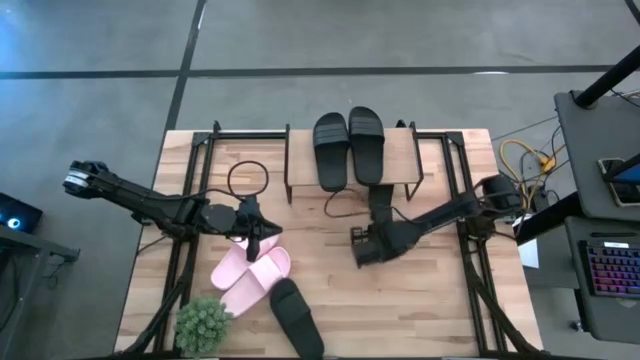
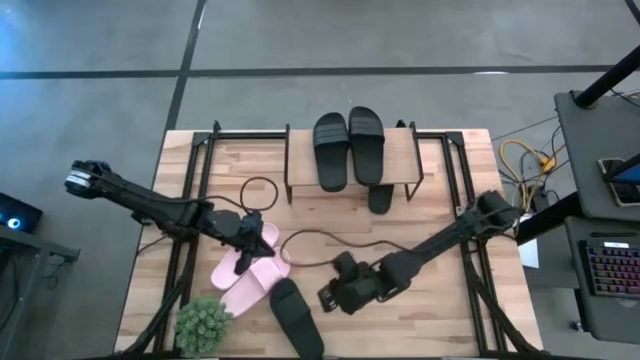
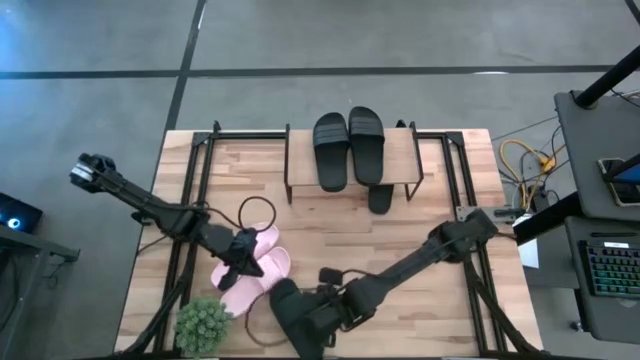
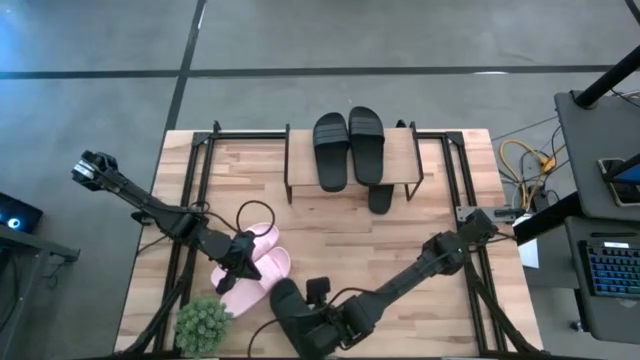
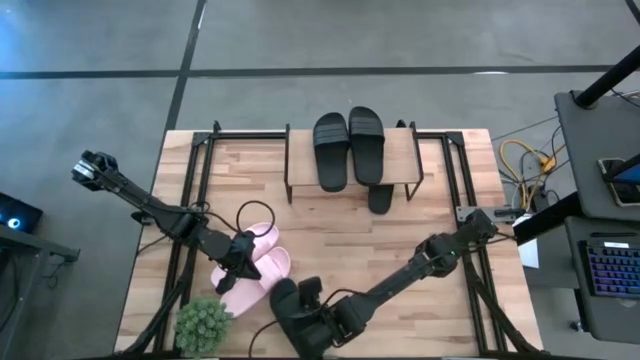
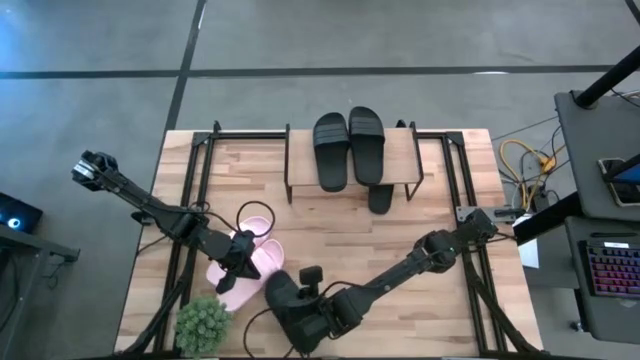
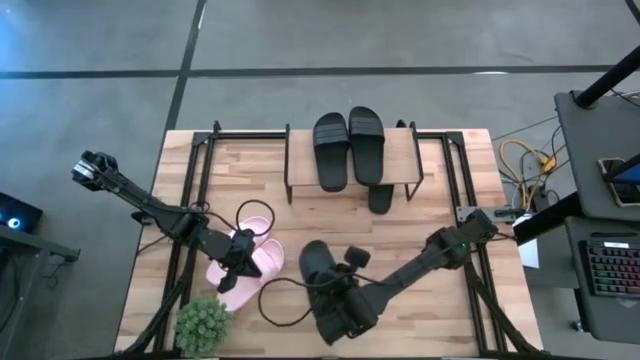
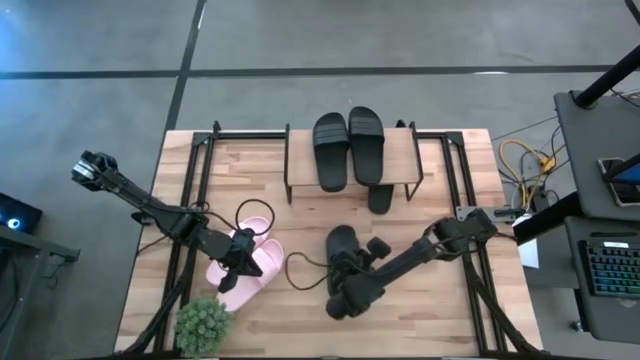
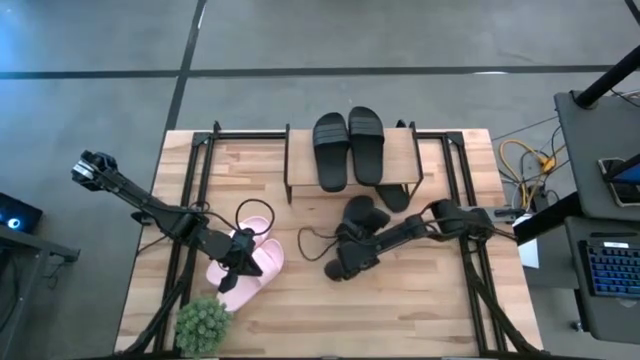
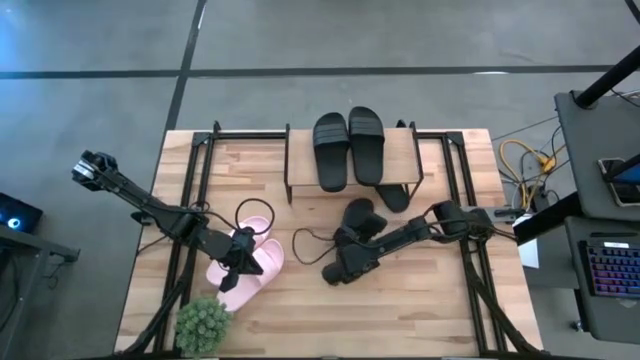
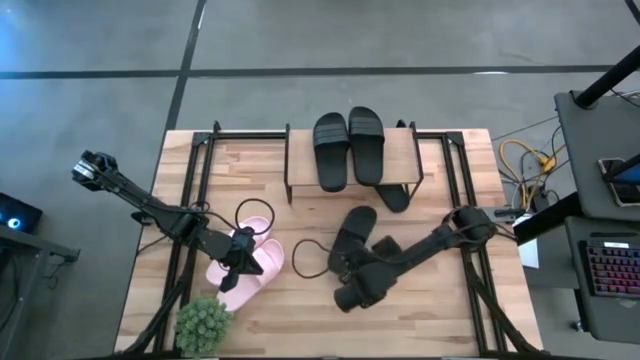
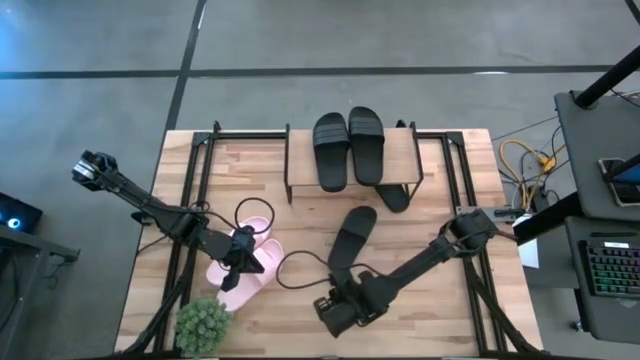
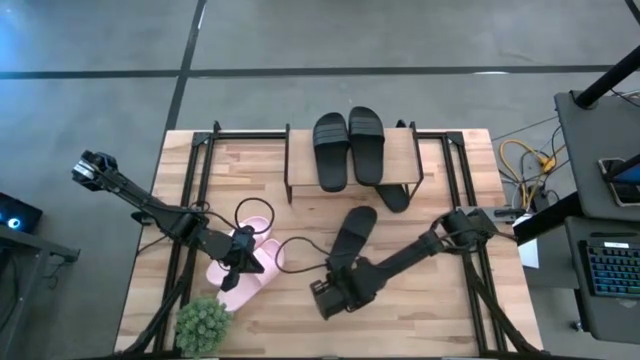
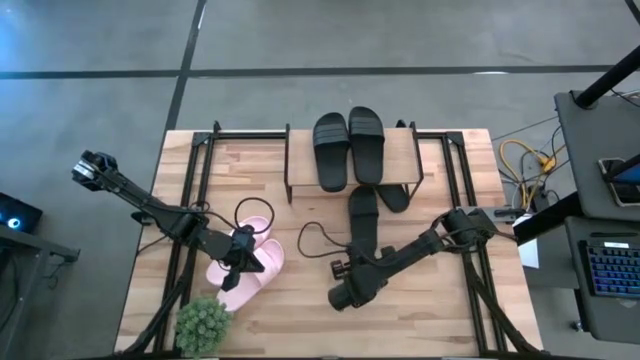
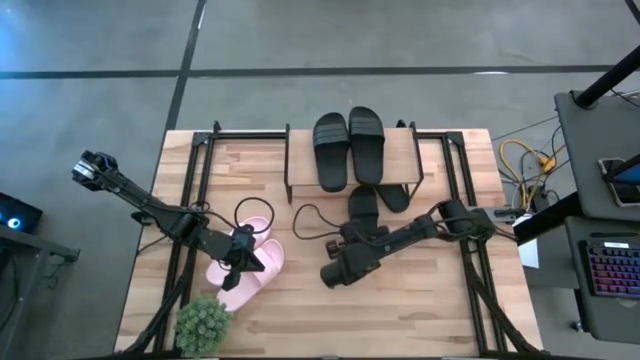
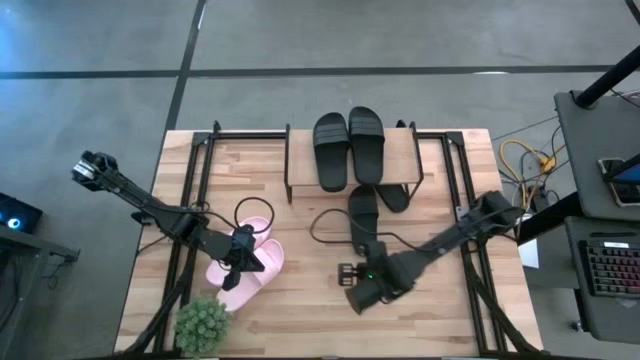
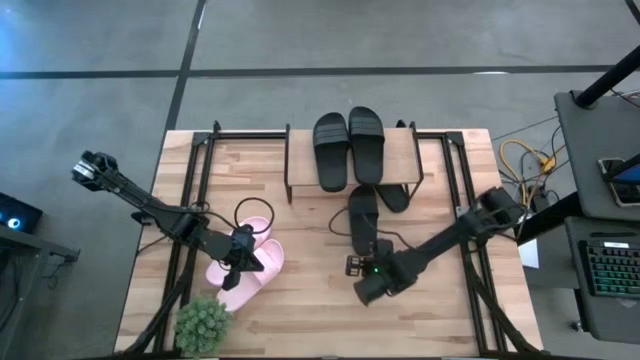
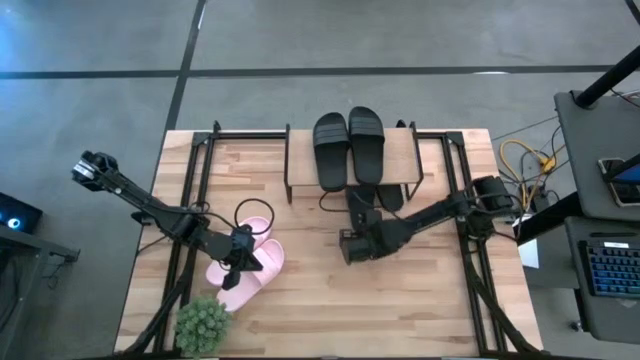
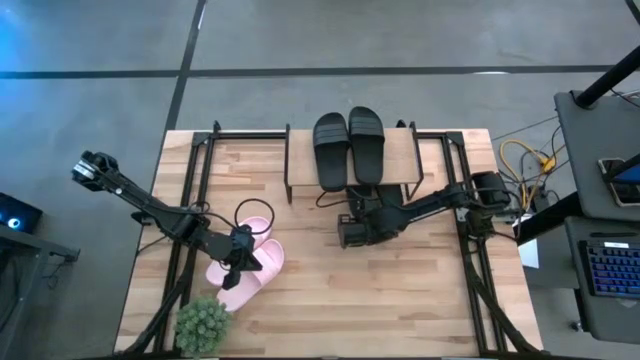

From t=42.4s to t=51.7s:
Task: Pick and place slides into the shelf
Put the black slide under the shelf

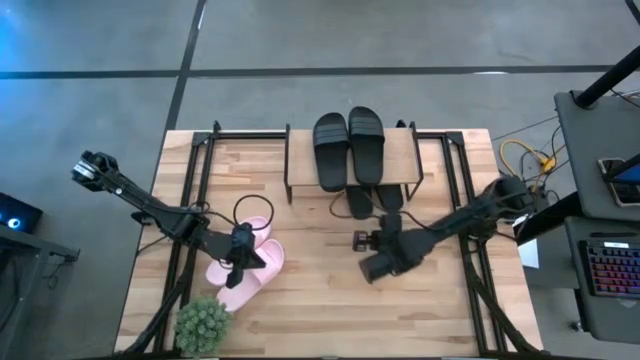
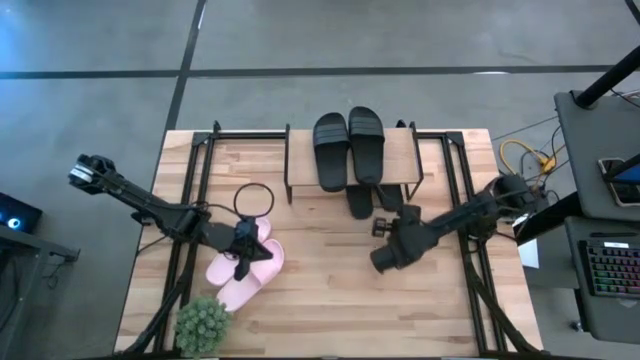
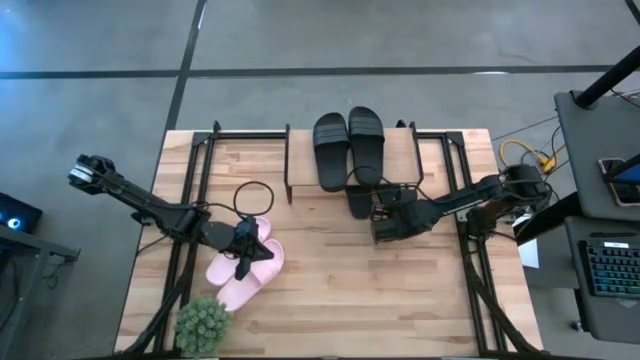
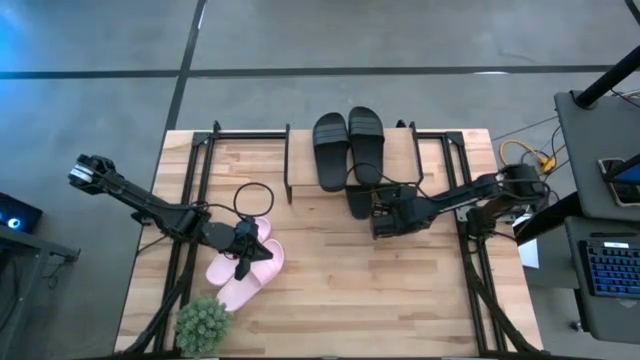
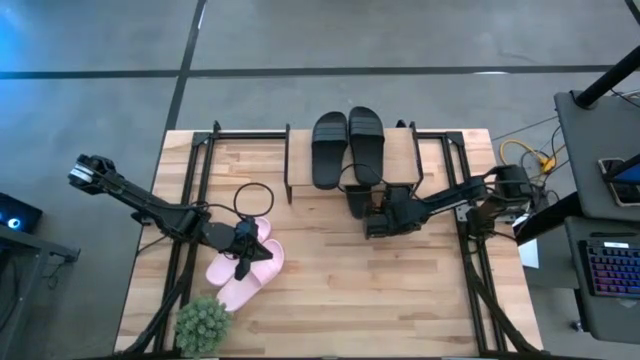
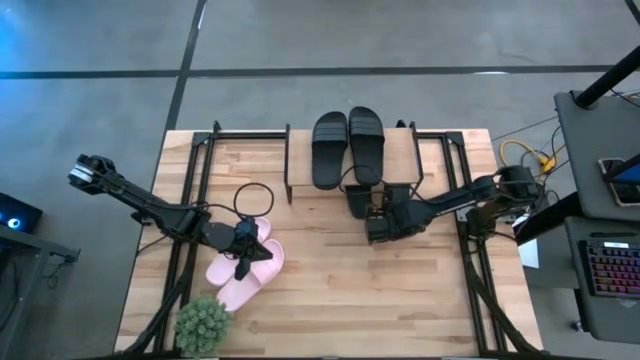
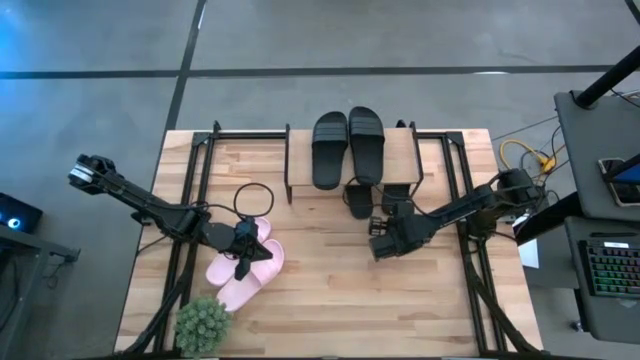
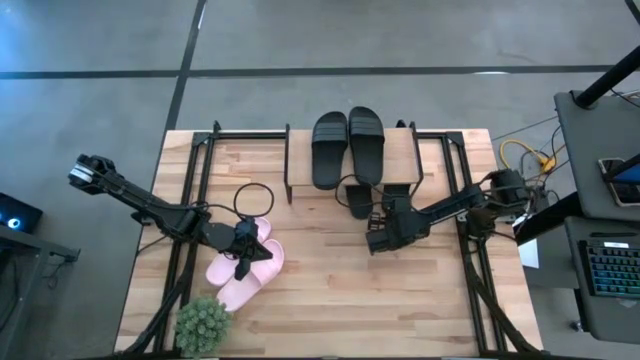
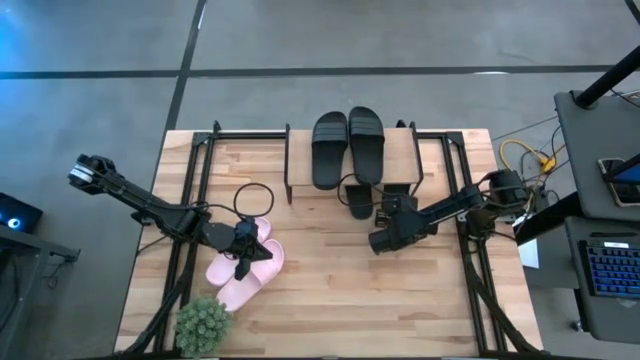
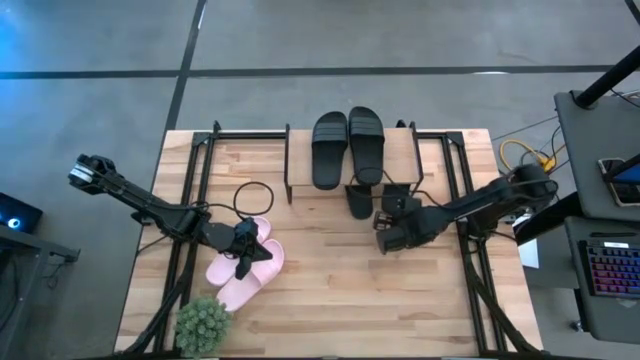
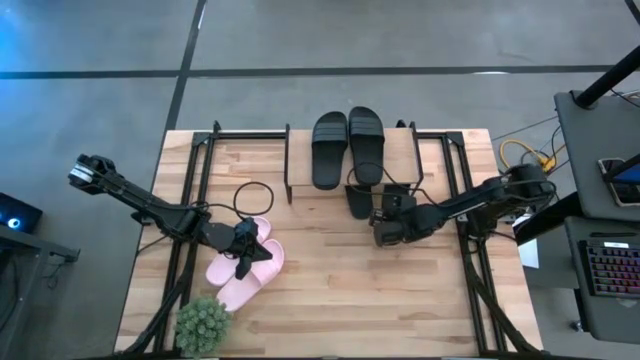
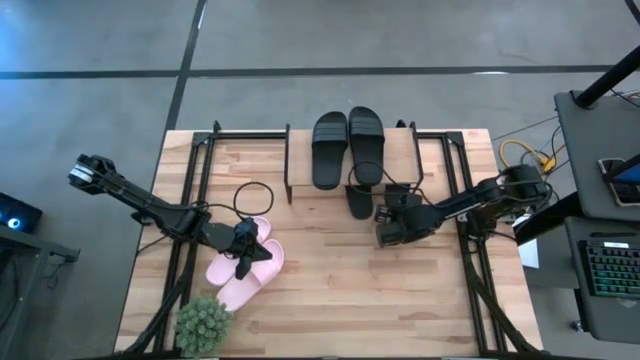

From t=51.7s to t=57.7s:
Adjust the right black slide under the shelf

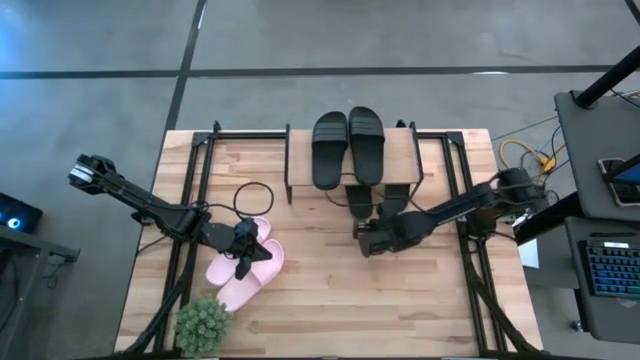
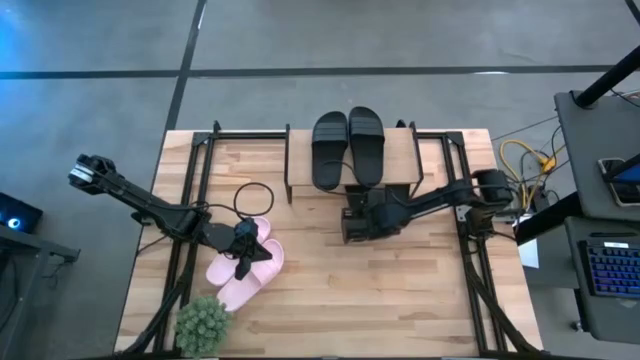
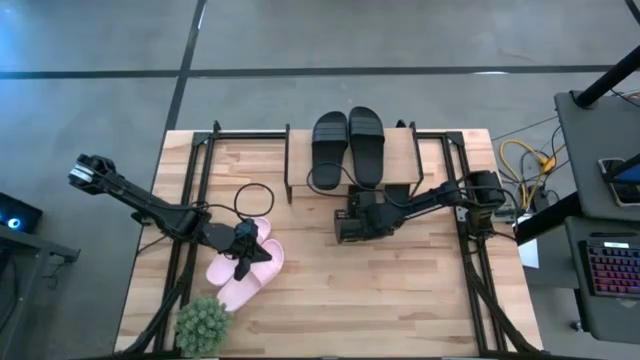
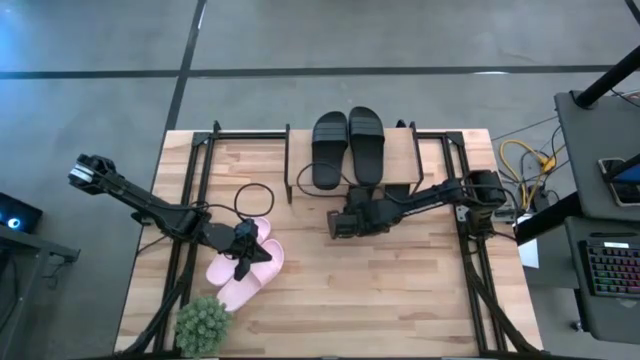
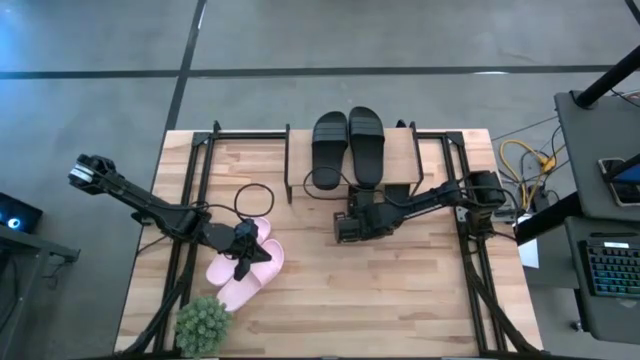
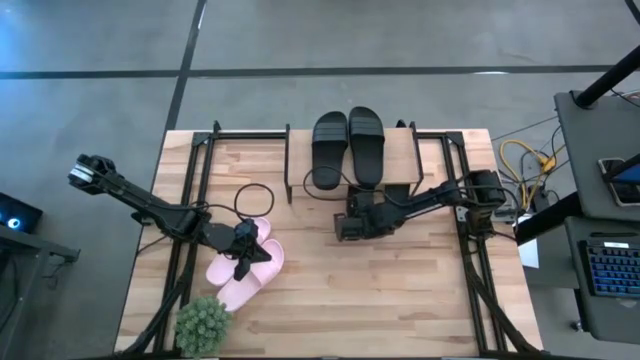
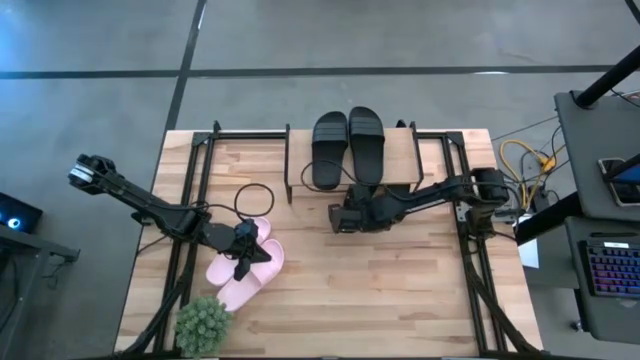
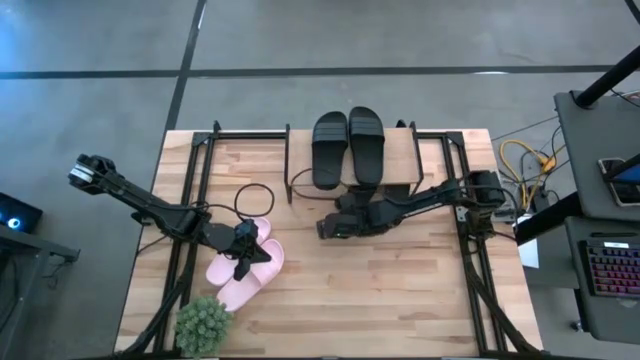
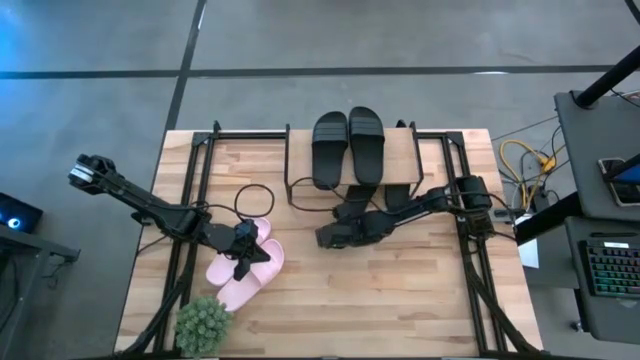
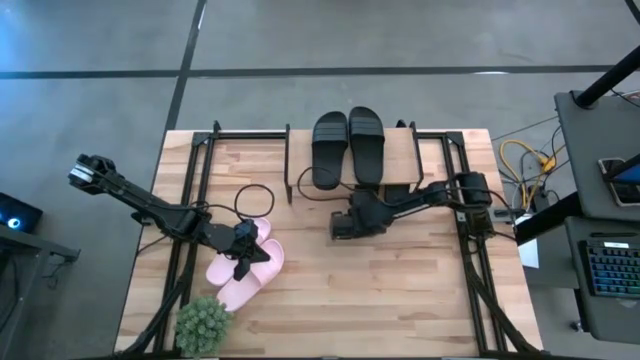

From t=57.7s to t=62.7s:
Adjust the left black slide under the shelf
